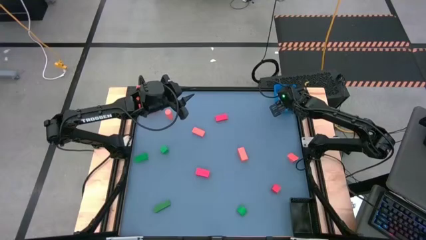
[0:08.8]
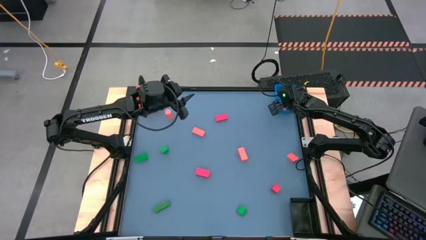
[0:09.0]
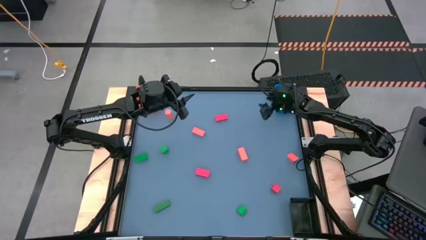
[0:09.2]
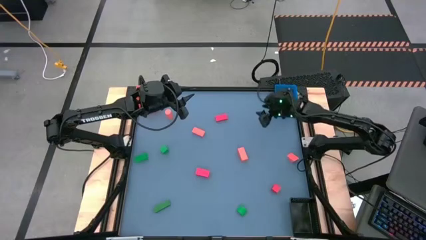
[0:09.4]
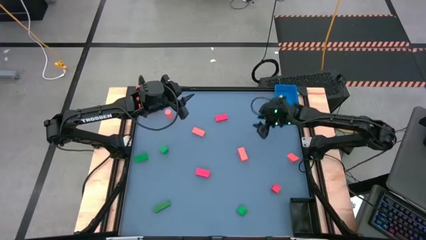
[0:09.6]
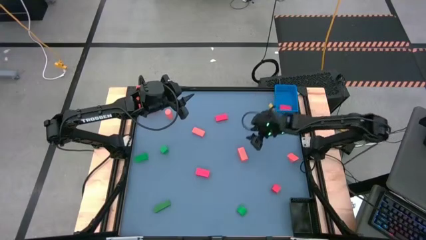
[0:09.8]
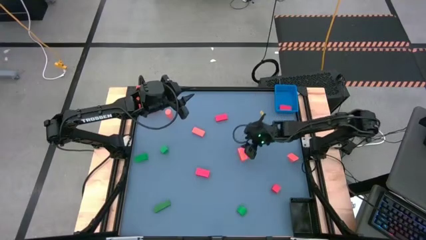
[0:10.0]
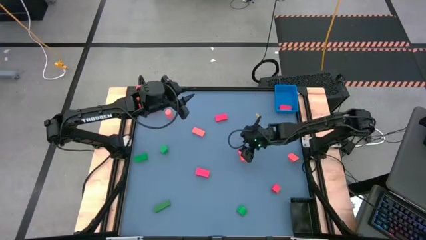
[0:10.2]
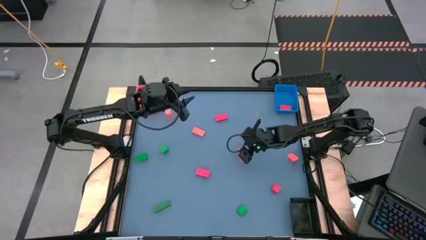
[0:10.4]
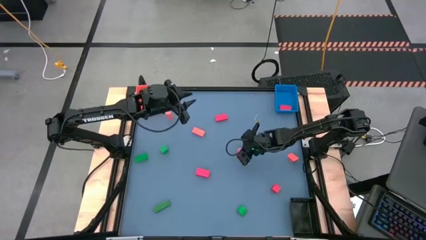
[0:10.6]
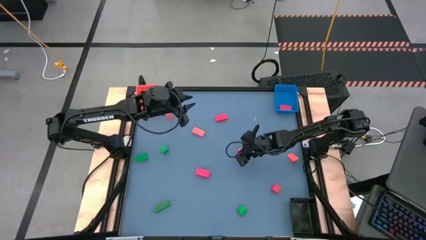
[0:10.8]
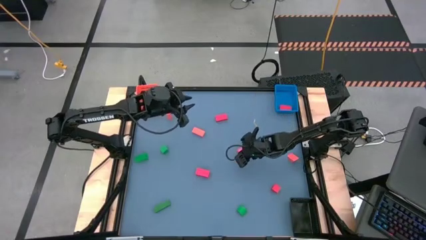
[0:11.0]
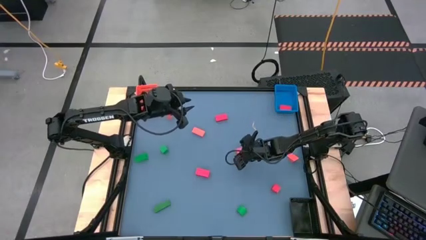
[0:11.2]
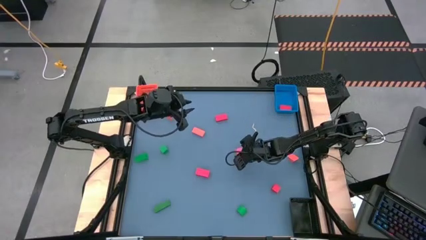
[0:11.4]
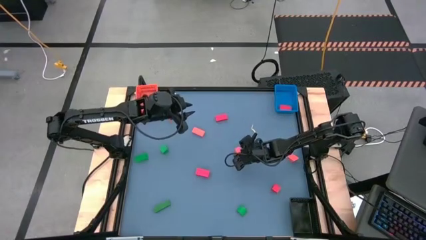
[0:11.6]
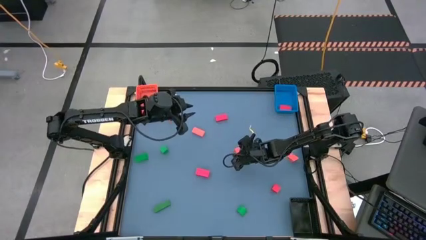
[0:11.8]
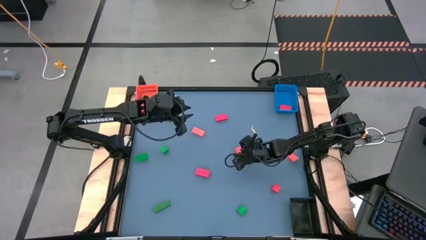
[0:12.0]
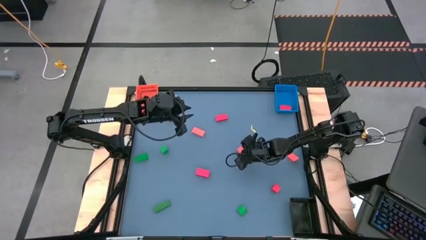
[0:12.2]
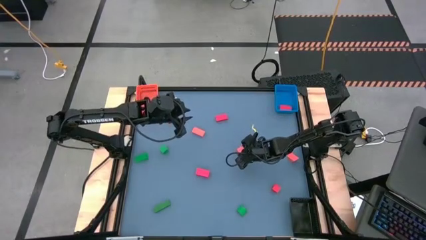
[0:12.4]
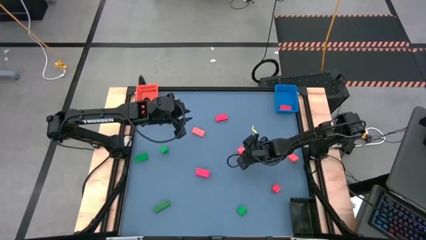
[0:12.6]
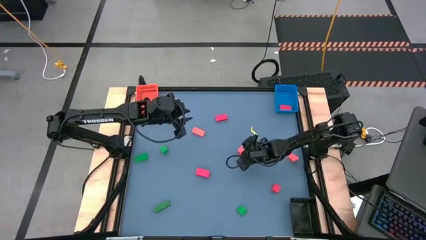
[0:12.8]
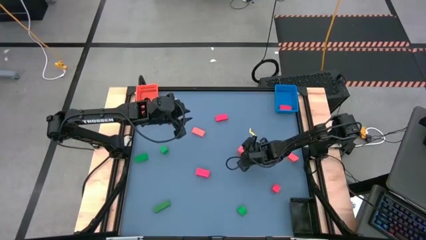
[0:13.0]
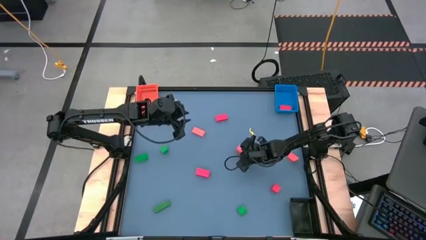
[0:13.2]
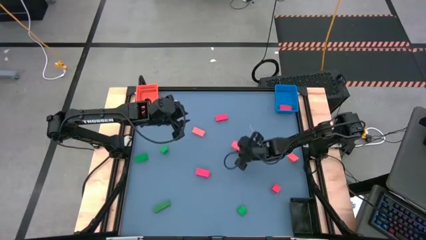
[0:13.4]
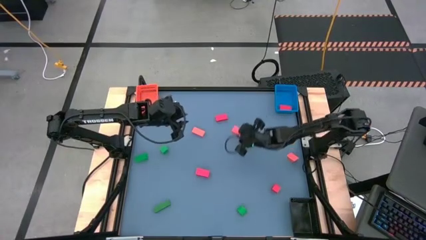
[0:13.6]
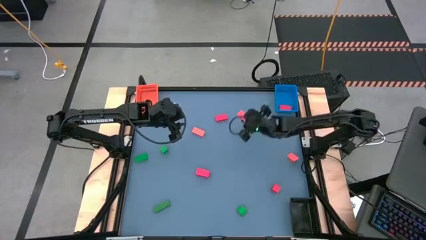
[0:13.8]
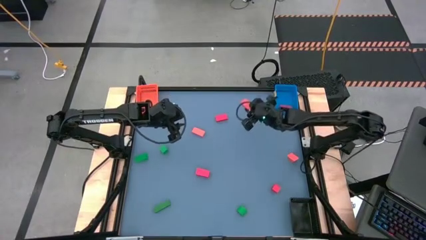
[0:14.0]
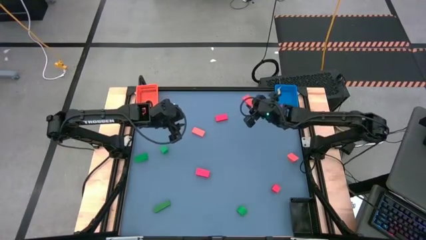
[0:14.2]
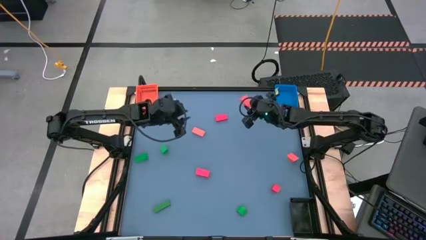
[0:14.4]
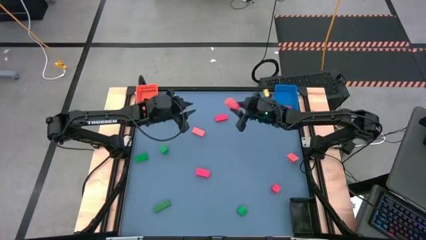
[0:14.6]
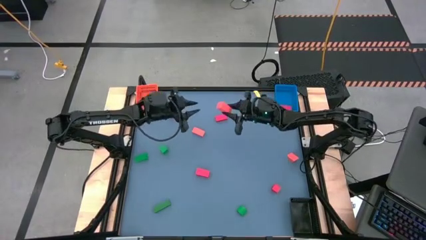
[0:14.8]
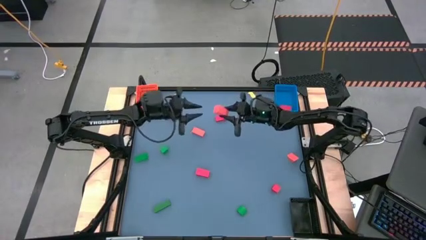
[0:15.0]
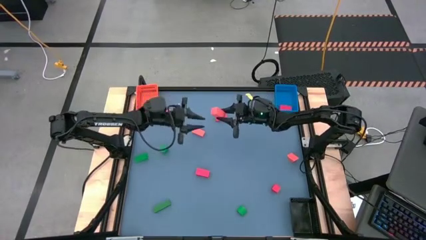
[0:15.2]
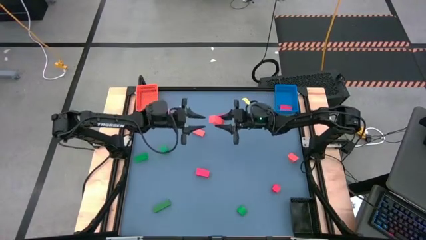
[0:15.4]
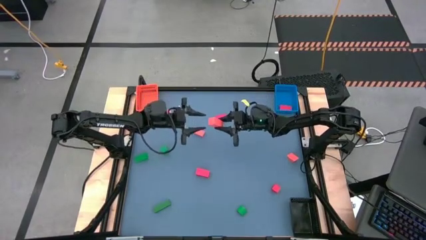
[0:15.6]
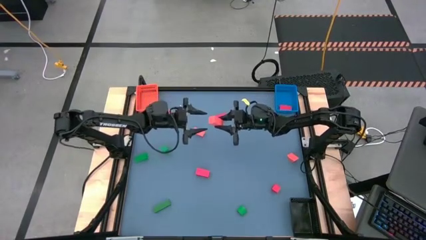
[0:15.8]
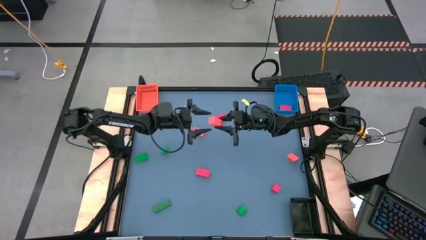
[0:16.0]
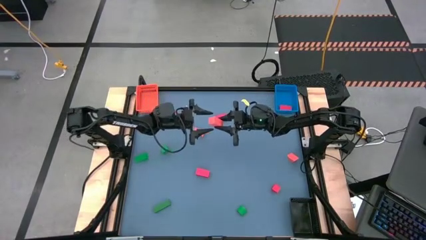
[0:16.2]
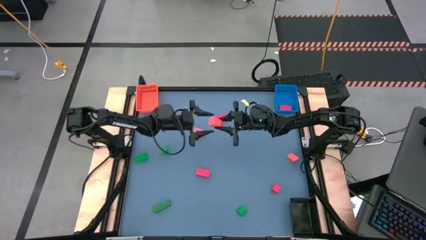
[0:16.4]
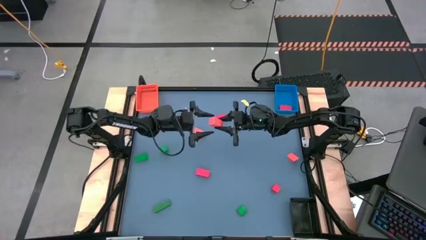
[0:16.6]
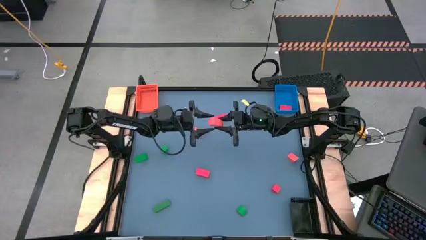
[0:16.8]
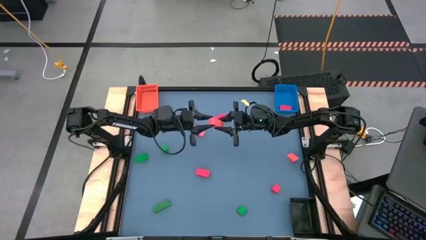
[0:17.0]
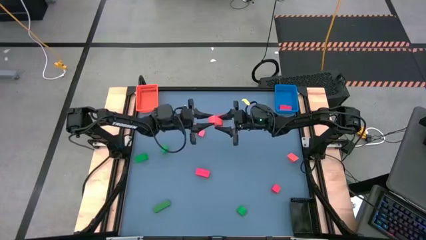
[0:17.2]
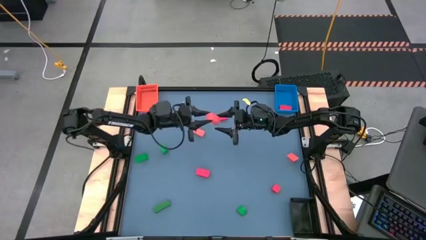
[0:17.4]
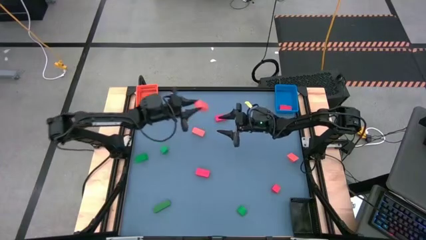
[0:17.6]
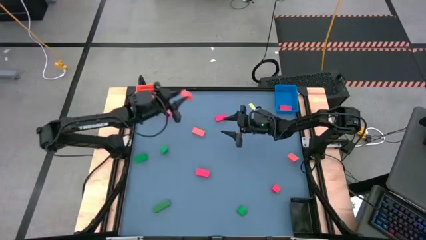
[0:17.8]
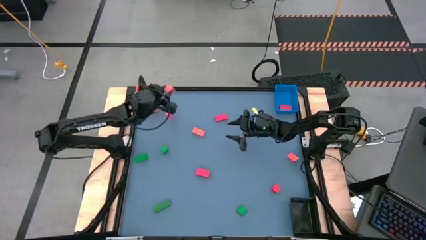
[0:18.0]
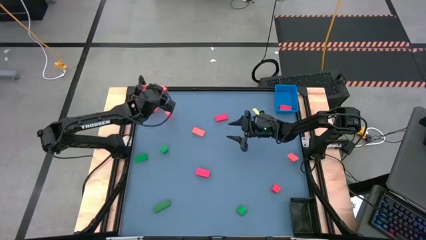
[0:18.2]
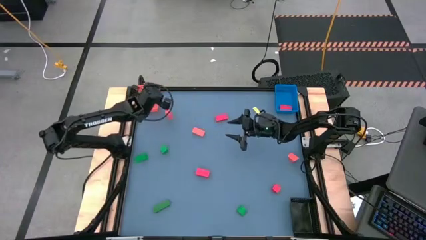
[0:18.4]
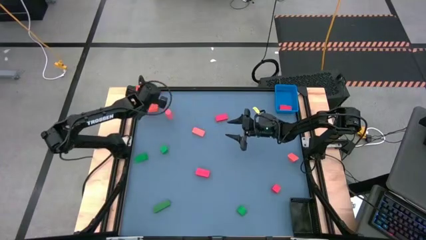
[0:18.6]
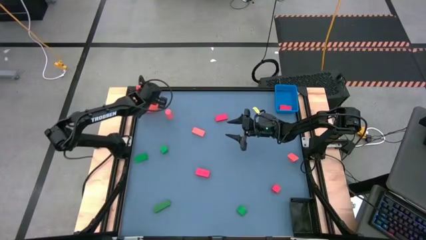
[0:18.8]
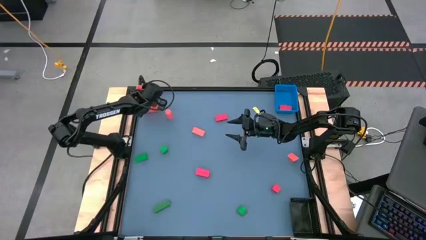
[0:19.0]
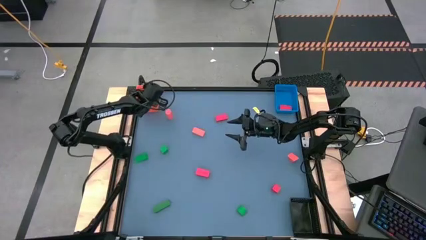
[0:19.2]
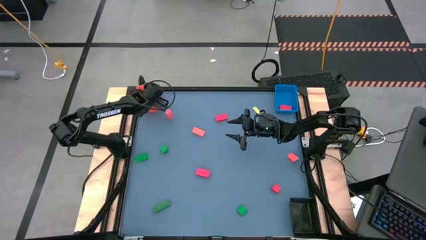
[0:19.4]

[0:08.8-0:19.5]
Task: Sort & place blocks by color
Put the orange block into the orange bin

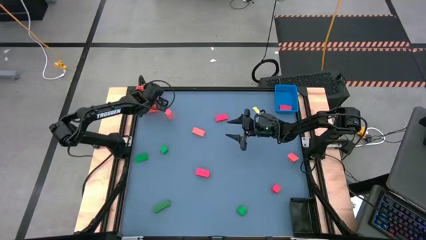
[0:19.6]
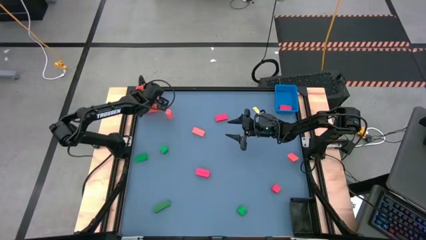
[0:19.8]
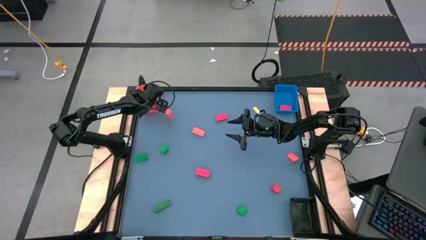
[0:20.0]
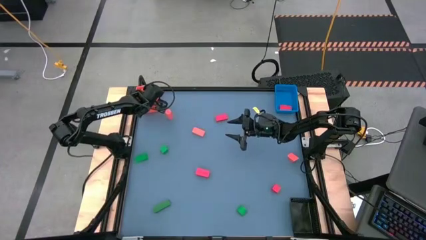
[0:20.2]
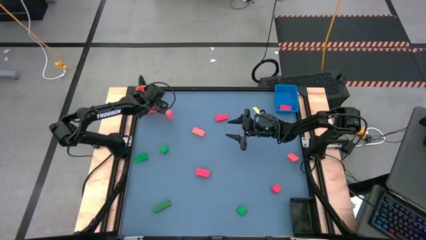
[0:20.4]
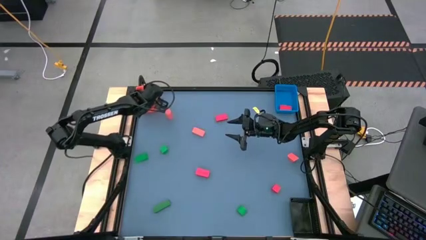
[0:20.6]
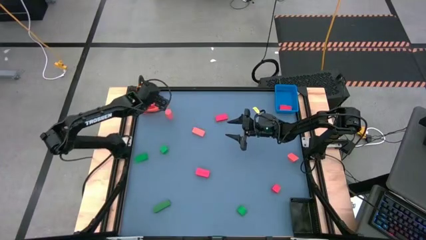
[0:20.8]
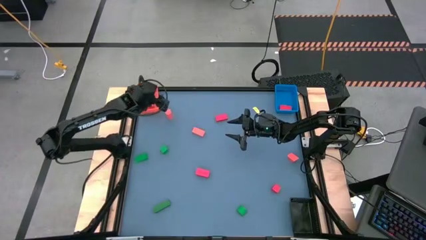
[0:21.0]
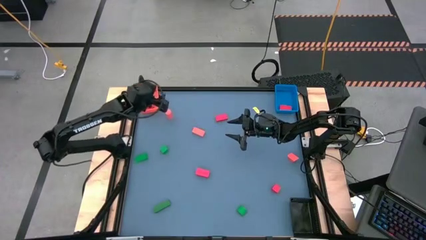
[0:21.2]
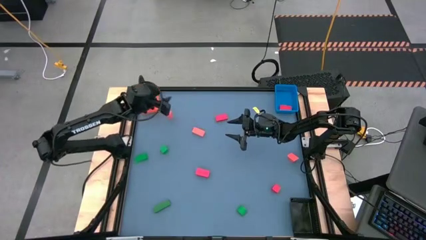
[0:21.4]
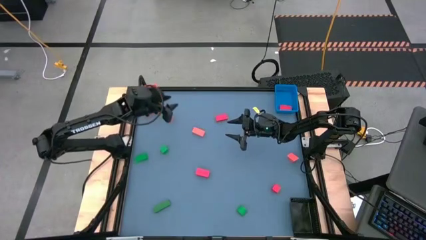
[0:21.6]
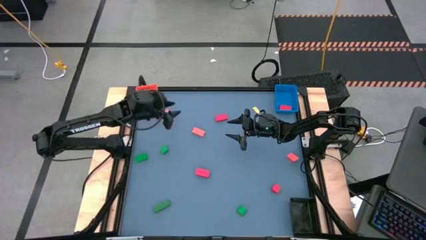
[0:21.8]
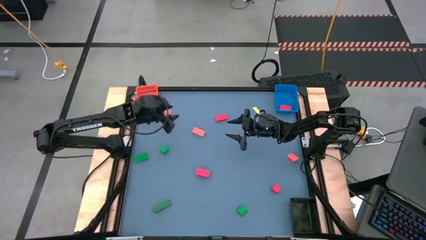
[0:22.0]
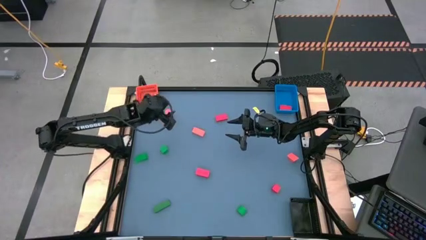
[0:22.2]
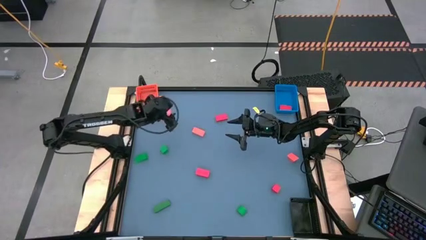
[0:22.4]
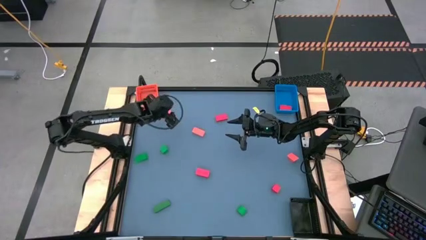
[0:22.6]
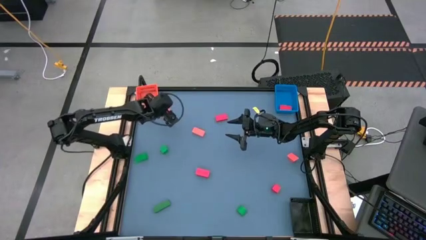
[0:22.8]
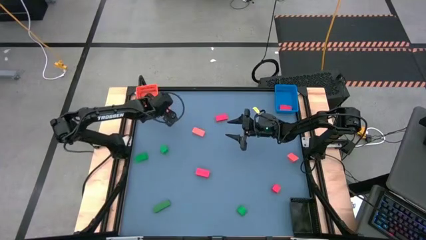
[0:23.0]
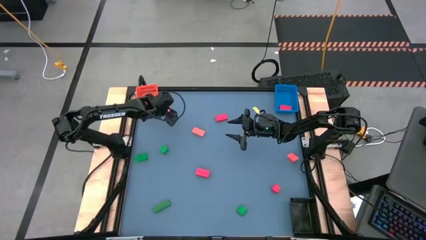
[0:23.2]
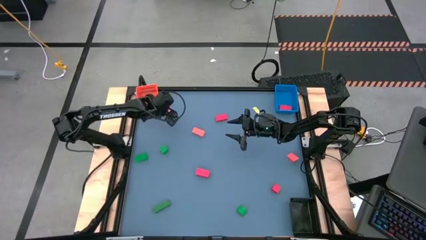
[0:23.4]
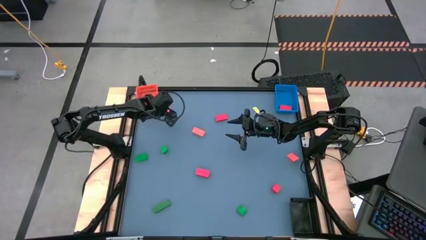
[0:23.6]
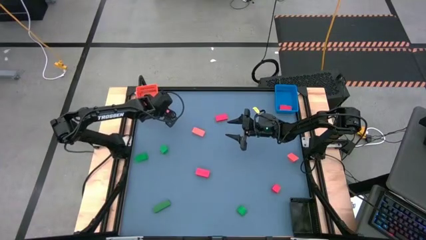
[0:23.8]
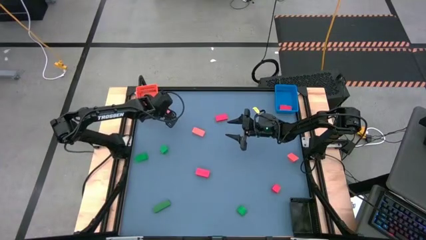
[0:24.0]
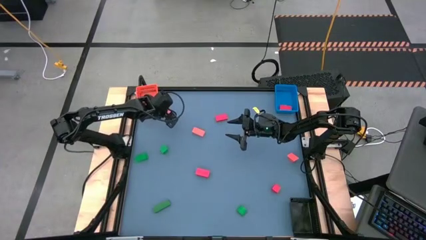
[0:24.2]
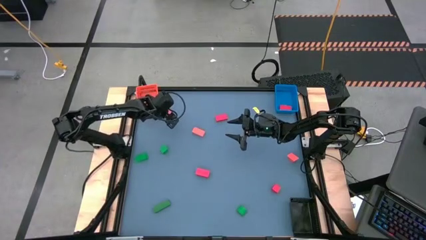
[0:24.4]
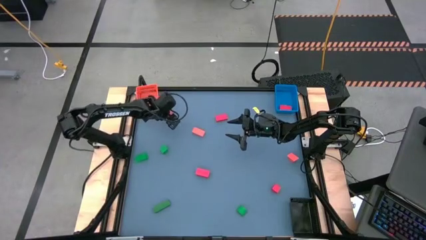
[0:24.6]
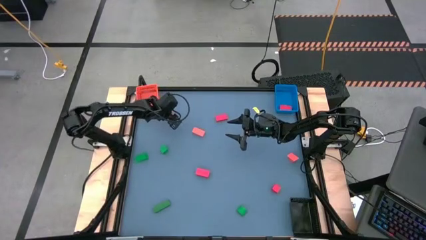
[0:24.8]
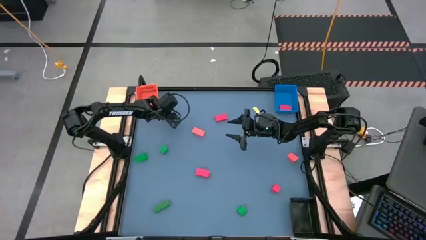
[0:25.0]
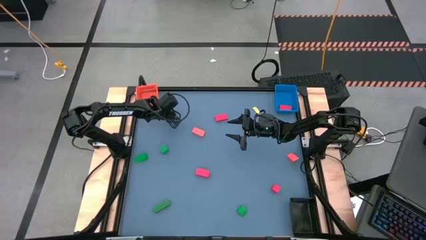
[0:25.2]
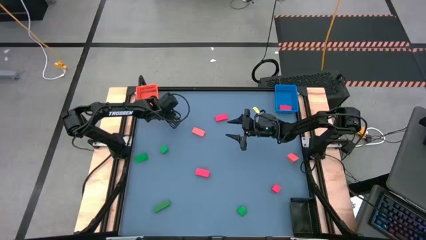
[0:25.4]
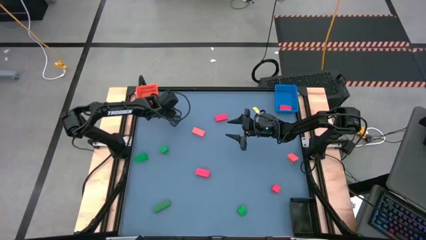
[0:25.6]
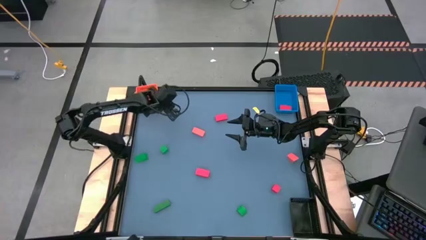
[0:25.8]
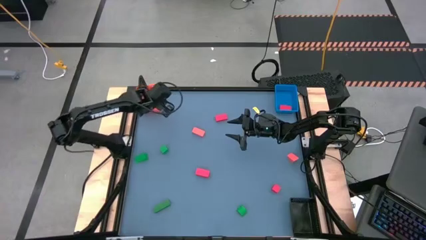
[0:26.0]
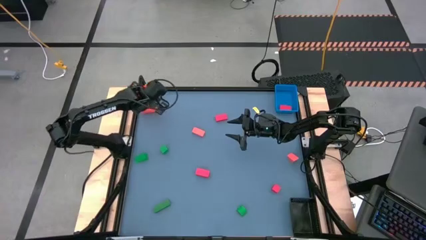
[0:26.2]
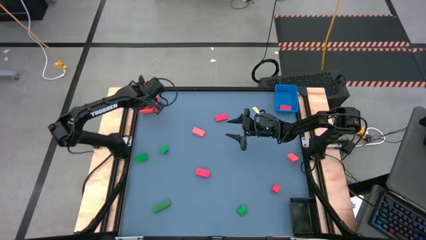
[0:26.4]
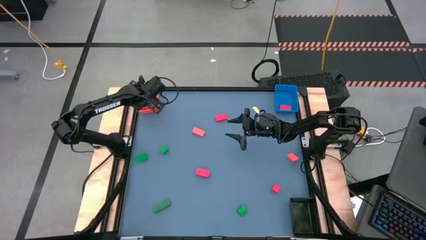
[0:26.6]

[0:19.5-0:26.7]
Put the orange block into the orange bin
